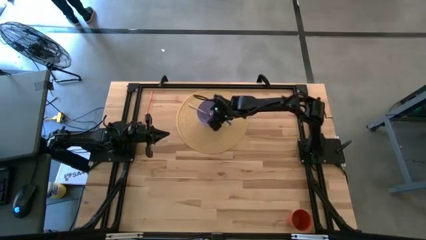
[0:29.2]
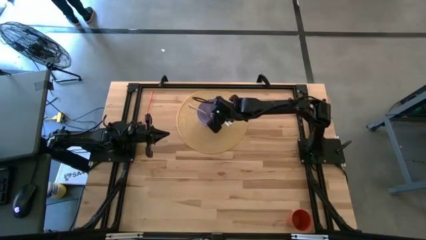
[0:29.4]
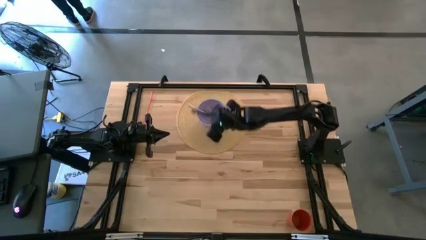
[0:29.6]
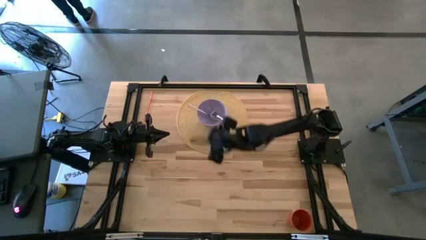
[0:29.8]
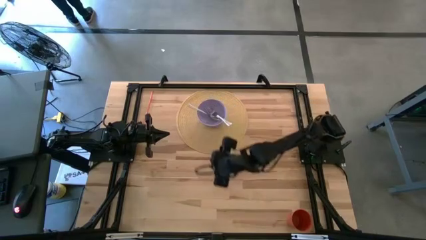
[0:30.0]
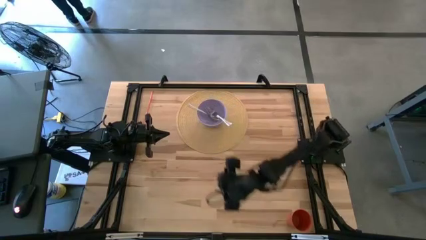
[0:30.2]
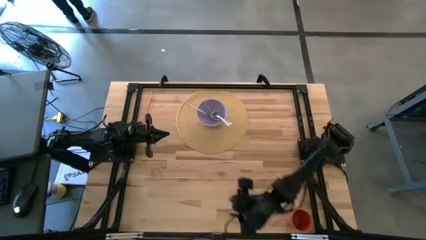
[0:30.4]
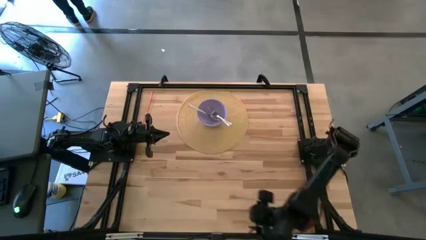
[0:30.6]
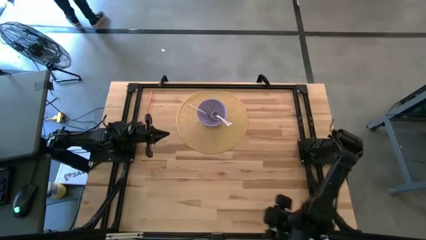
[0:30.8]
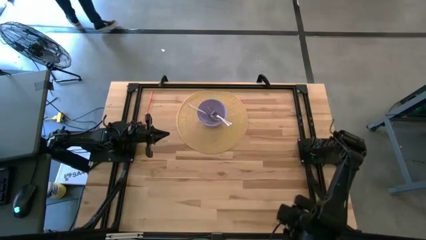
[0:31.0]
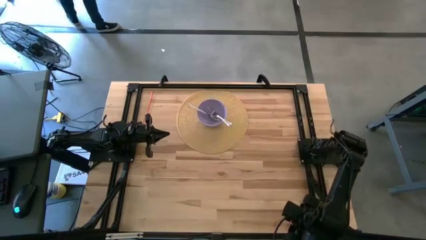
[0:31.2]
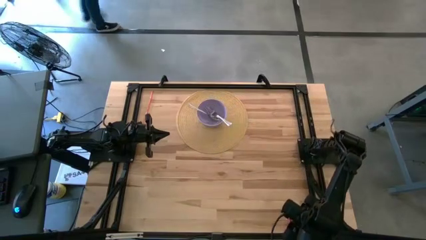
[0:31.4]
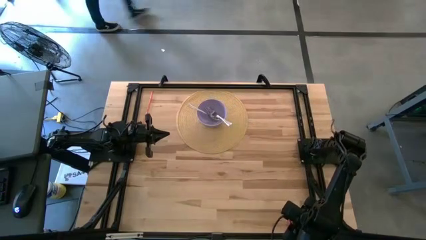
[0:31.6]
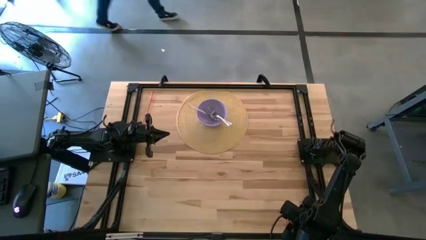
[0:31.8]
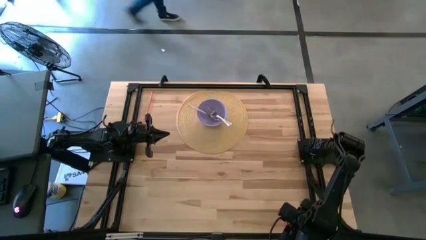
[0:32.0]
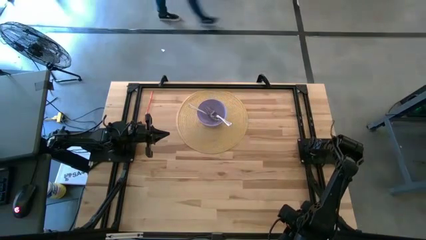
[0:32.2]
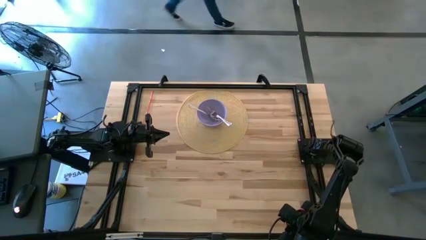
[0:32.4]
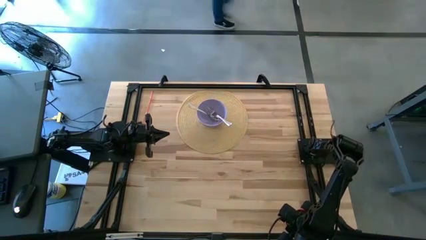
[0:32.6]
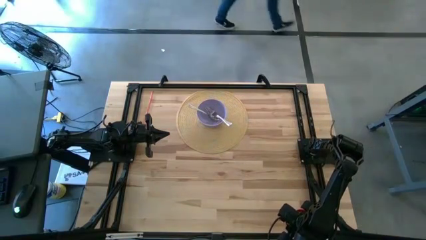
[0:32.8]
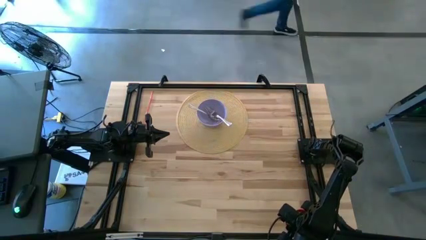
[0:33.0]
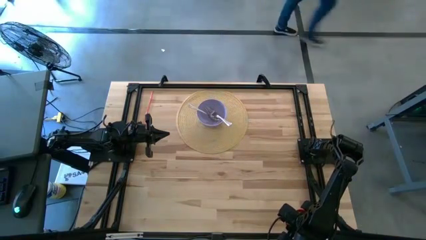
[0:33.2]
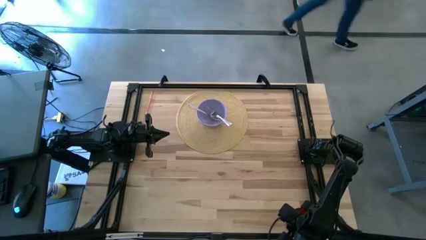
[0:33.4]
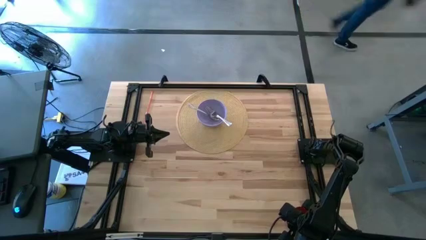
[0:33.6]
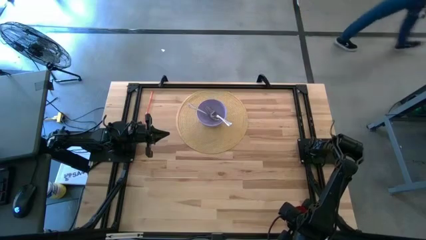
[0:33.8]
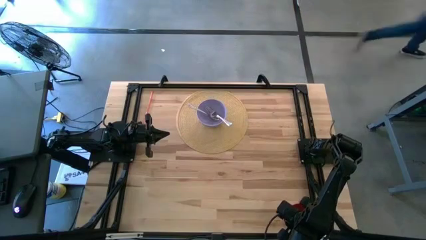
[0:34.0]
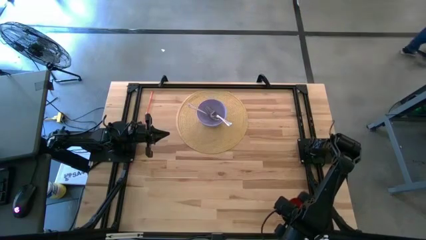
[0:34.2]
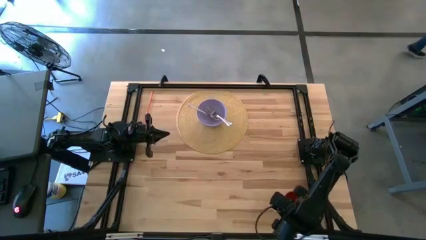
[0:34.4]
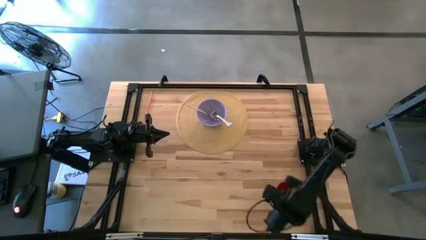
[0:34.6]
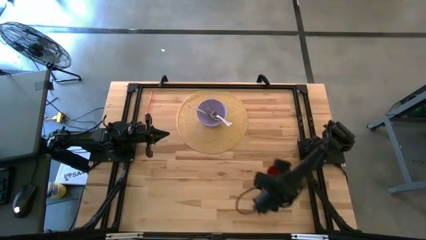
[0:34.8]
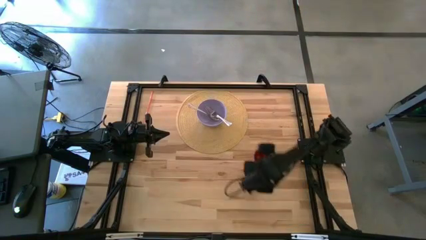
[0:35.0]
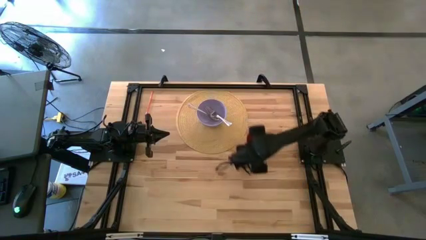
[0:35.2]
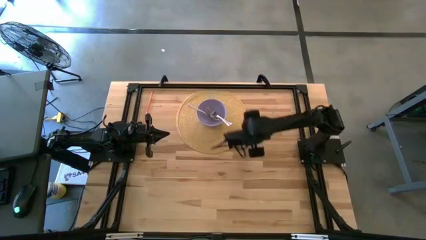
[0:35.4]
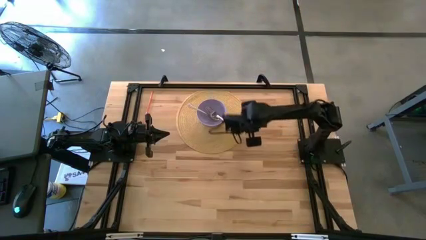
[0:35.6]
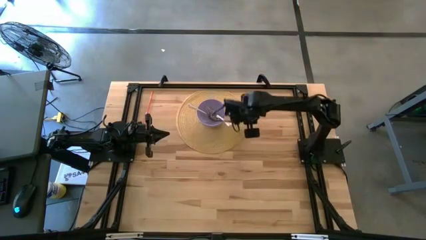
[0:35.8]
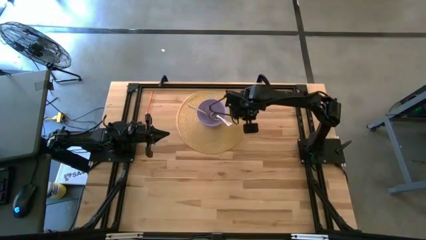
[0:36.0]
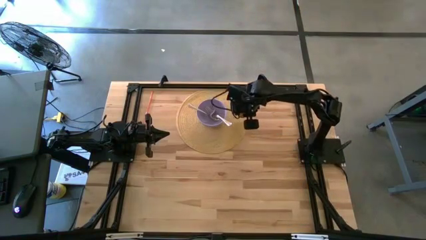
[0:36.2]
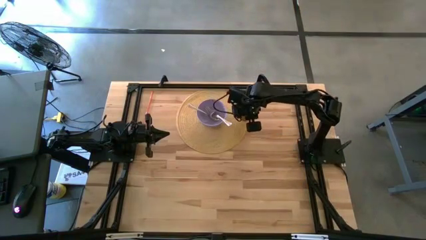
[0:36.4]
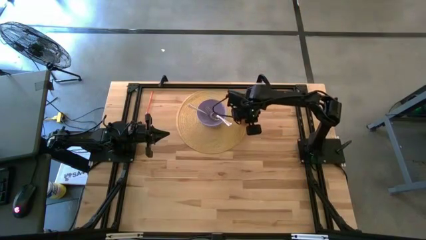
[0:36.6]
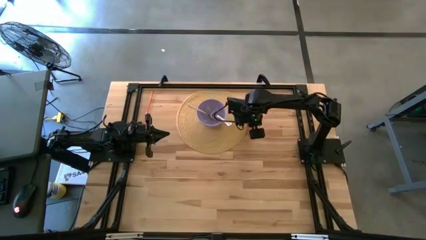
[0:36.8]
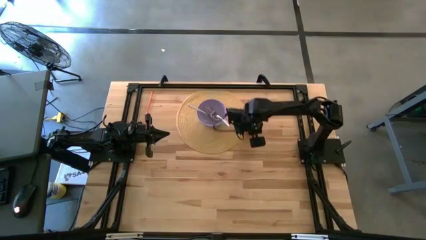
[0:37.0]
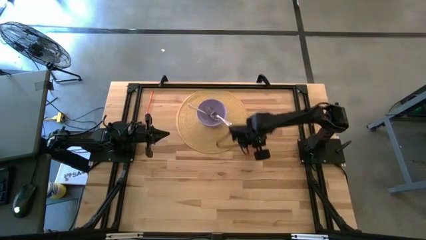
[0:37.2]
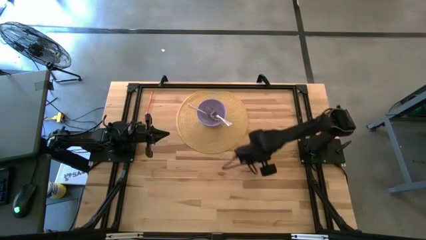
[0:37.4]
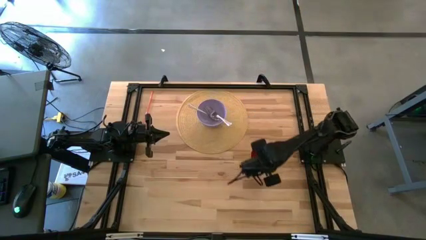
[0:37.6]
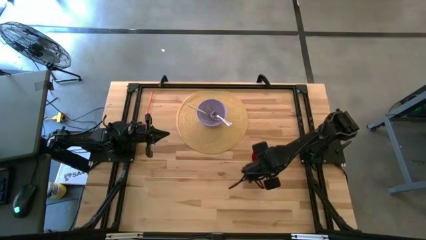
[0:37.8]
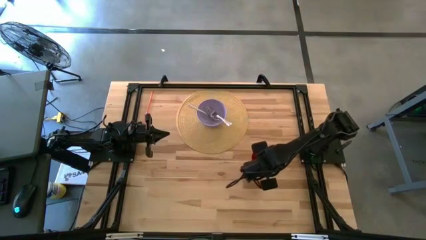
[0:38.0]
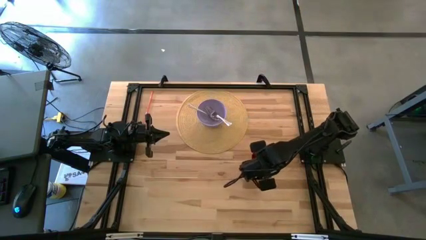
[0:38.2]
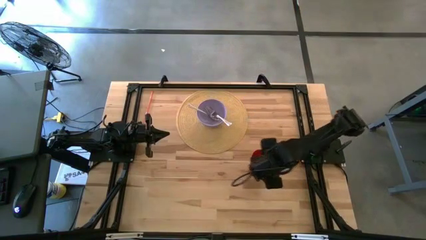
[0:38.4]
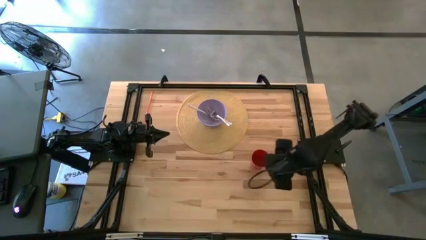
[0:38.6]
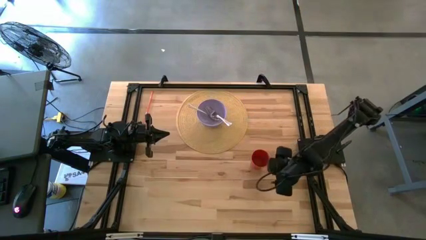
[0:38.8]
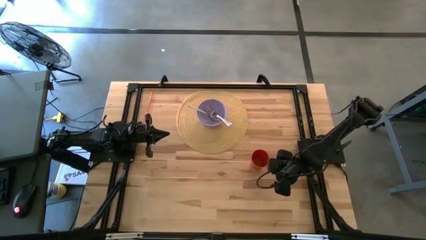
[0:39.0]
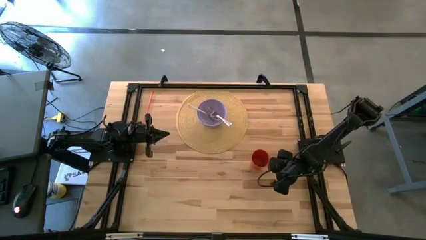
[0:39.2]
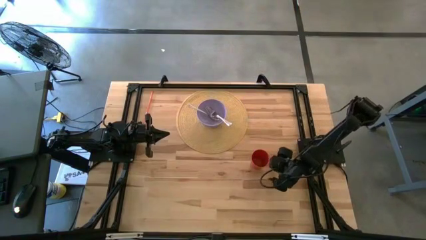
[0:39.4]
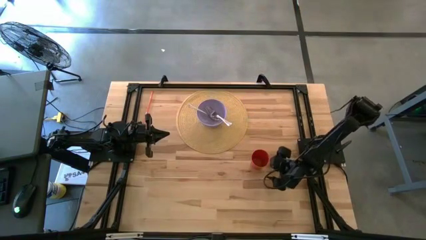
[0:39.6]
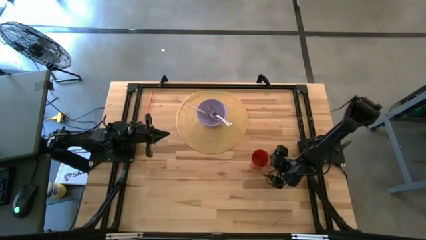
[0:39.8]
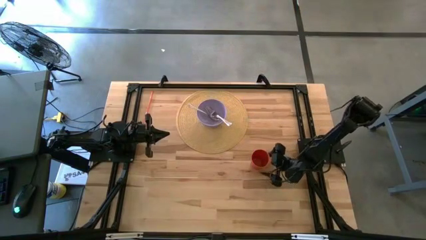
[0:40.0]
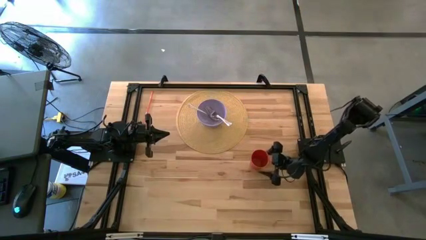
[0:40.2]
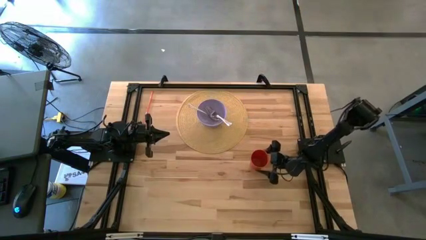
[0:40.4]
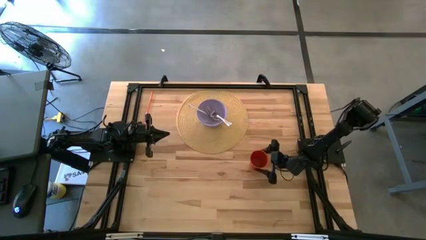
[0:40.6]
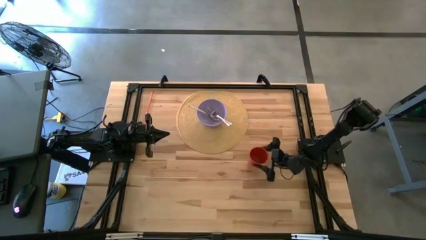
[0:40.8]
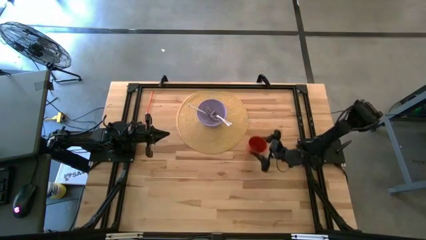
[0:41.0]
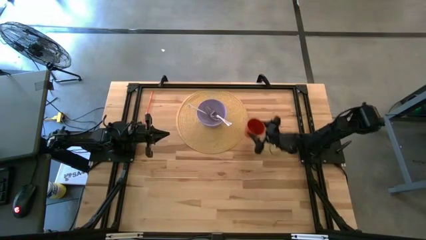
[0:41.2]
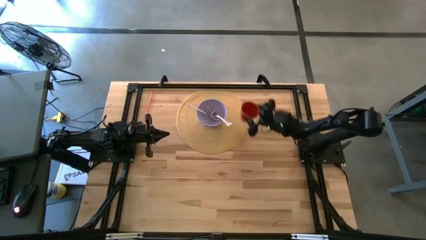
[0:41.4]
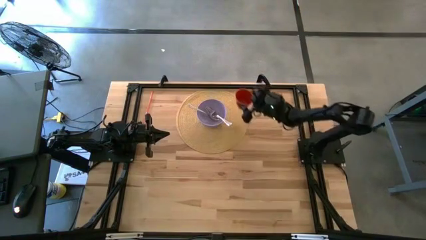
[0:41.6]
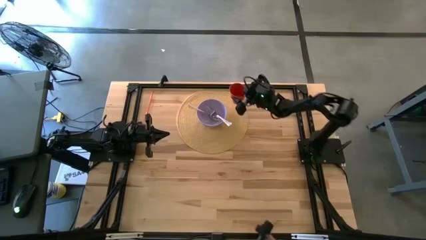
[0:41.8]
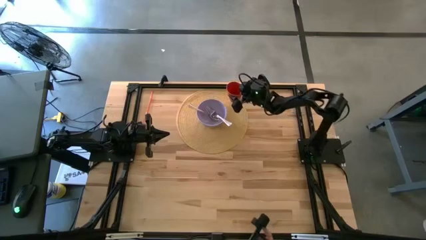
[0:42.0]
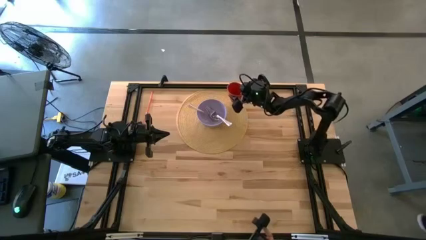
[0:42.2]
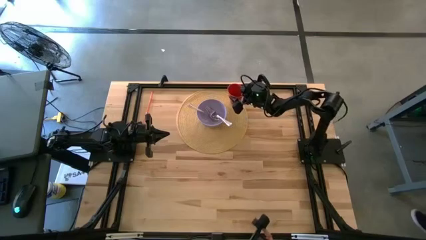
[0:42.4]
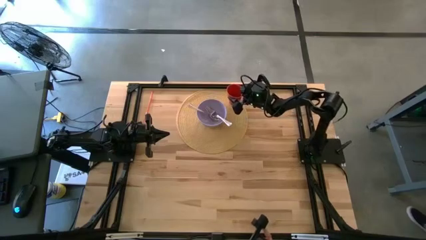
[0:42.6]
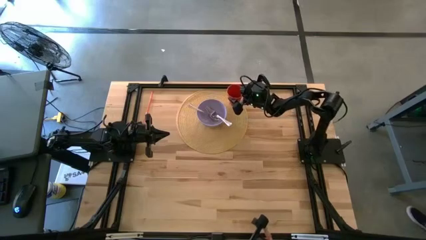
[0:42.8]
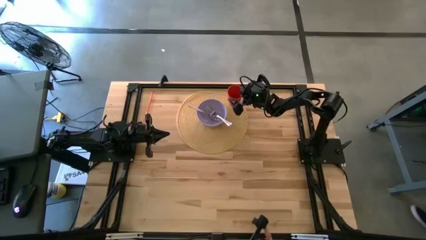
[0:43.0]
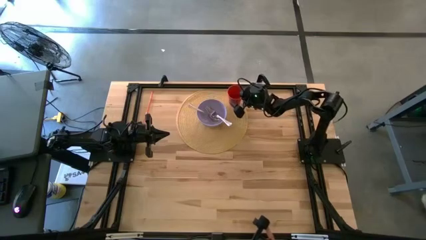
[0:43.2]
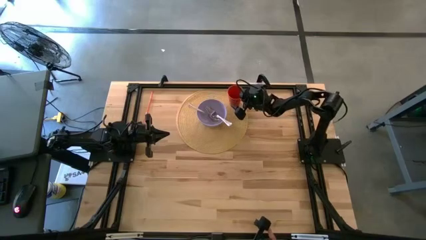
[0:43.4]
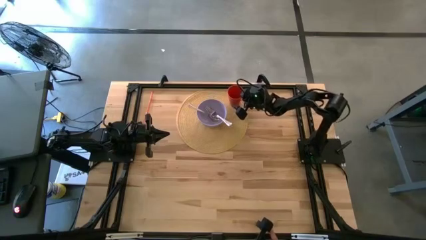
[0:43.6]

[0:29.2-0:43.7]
Task: Pick & Place Utensil
Put the orange cup on the yellow placemat to the top right of the purple bowl

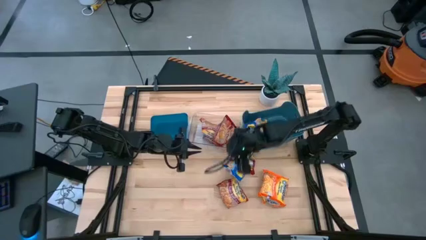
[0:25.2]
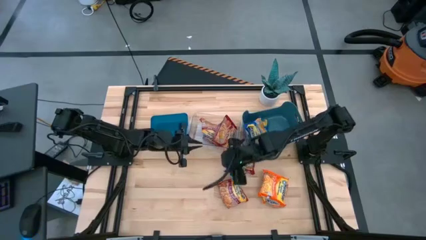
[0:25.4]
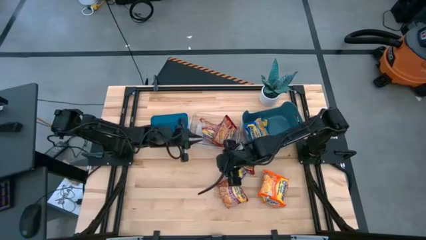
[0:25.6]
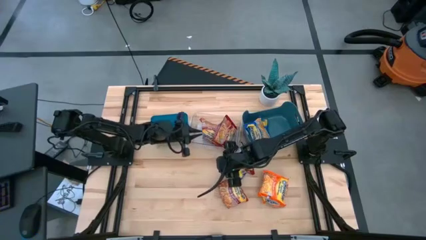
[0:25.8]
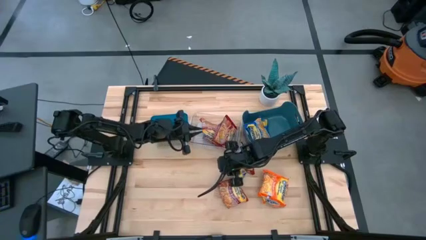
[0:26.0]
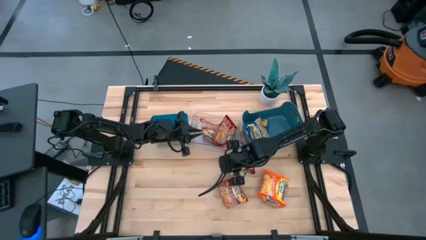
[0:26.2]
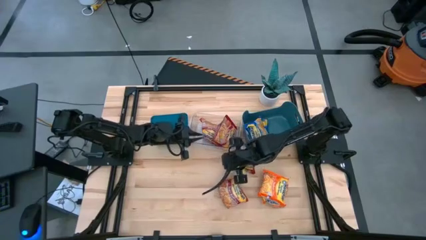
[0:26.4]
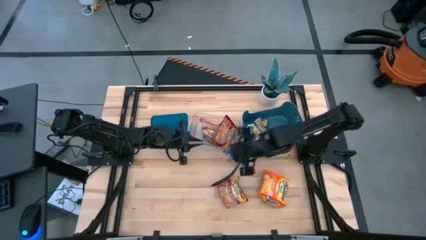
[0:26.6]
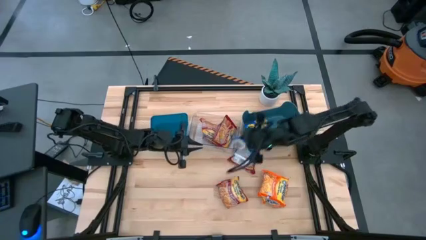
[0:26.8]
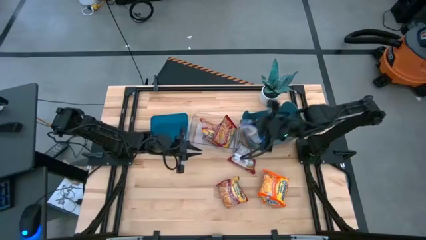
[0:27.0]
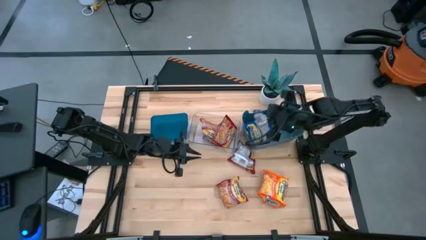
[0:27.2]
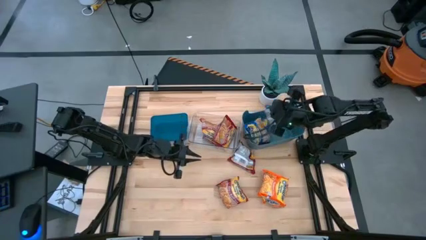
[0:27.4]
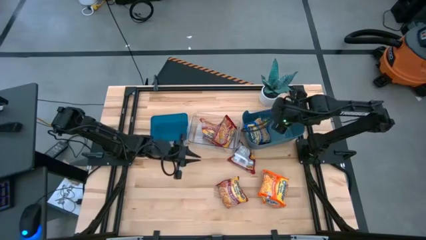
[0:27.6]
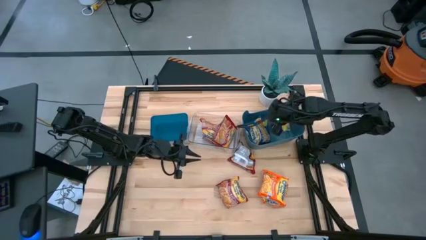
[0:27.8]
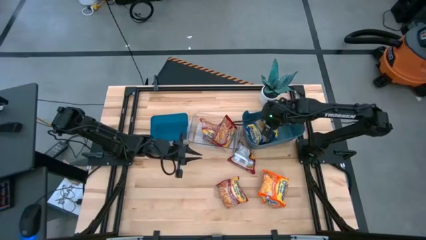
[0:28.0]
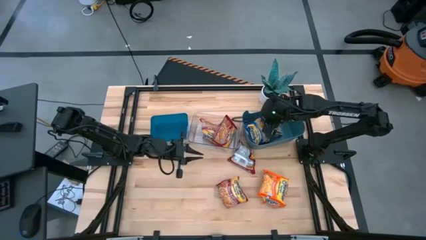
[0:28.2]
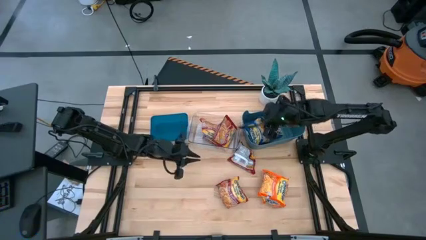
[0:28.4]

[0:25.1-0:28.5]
Task: Sort Maruchan noodles
Put the blue noodle pack into the right blue bin
